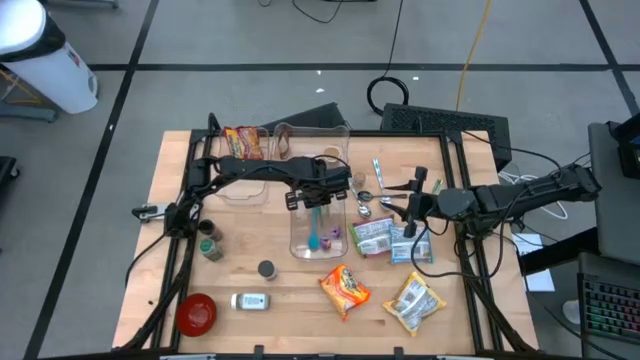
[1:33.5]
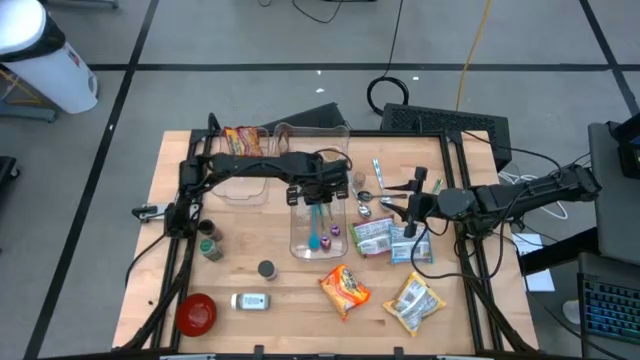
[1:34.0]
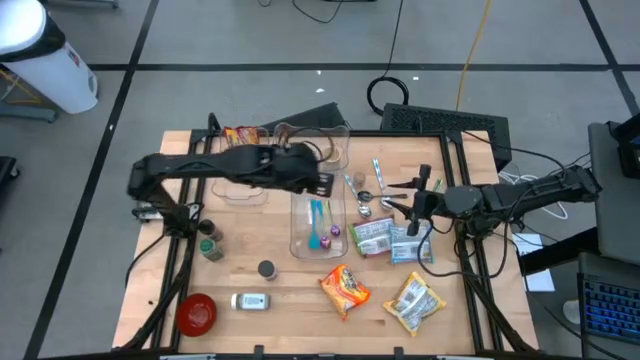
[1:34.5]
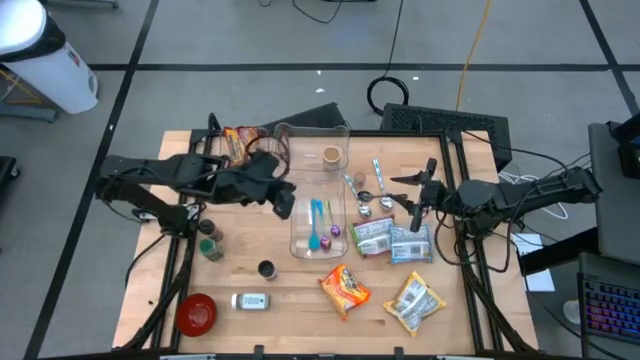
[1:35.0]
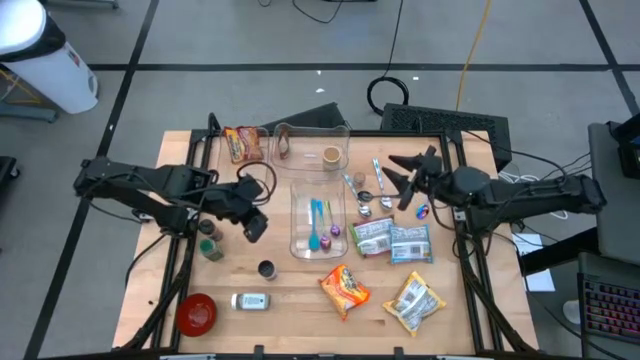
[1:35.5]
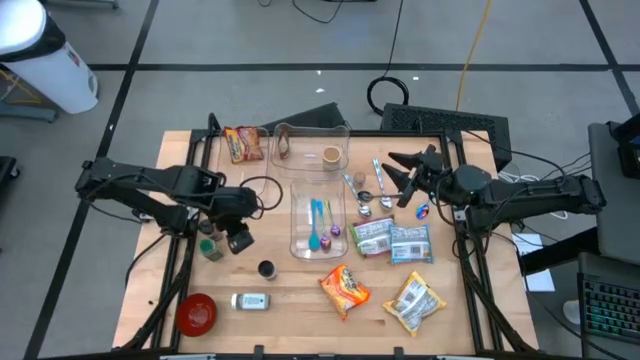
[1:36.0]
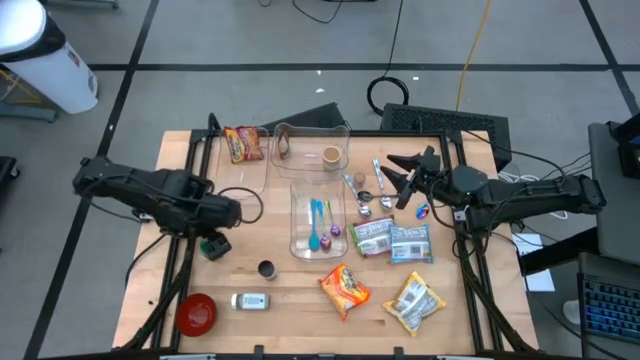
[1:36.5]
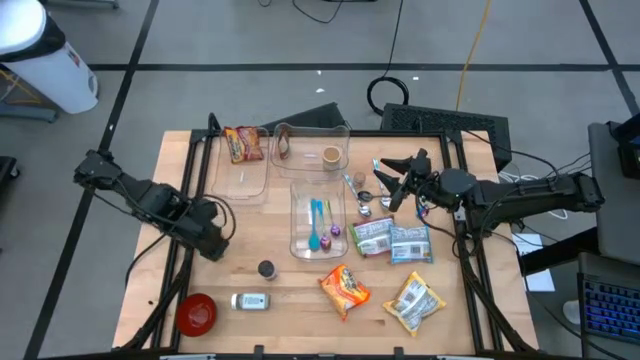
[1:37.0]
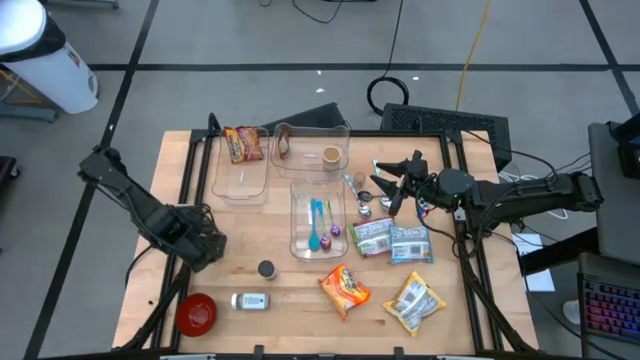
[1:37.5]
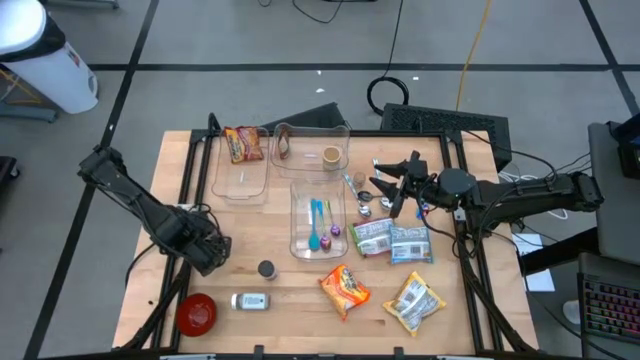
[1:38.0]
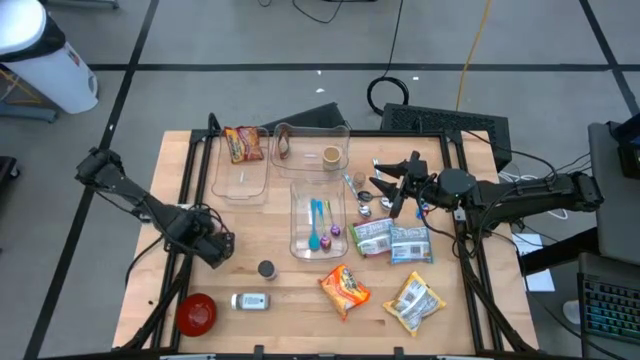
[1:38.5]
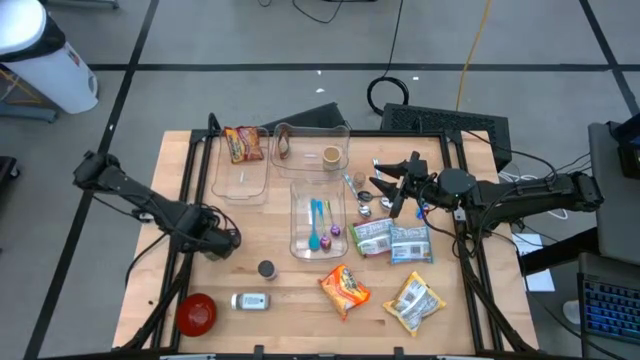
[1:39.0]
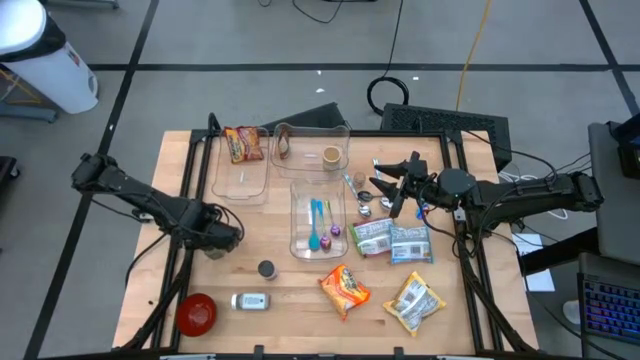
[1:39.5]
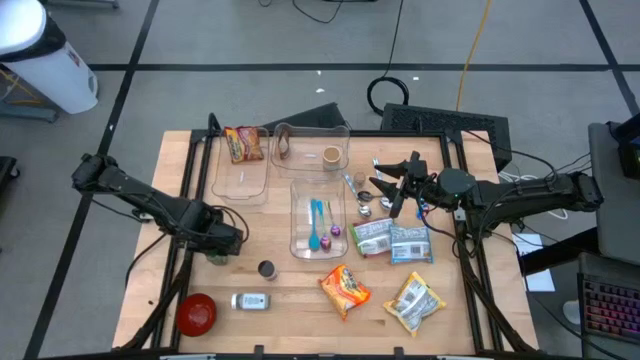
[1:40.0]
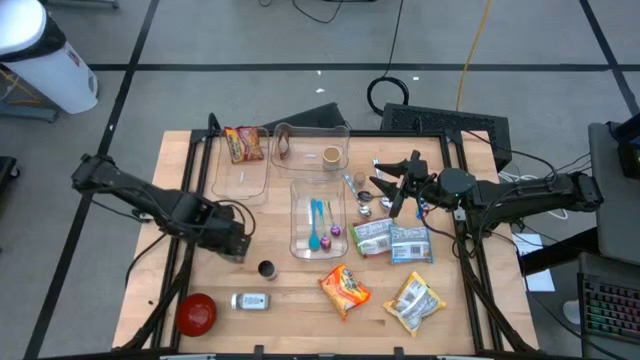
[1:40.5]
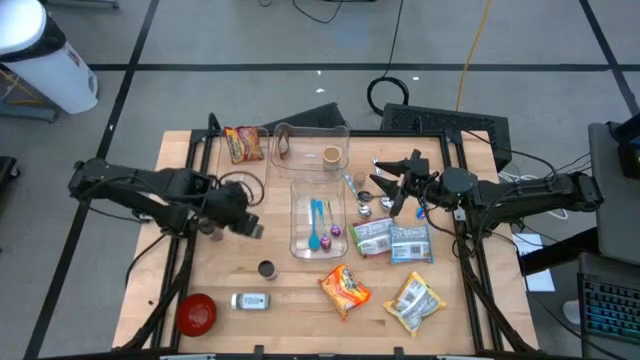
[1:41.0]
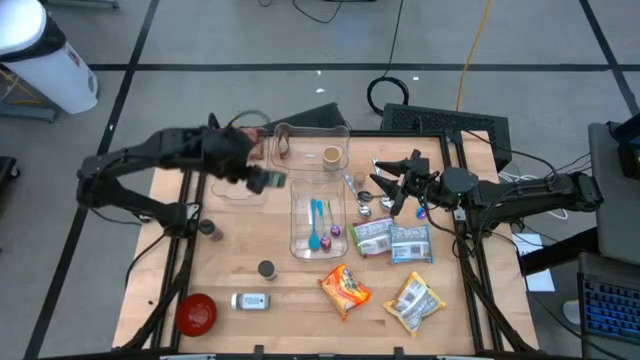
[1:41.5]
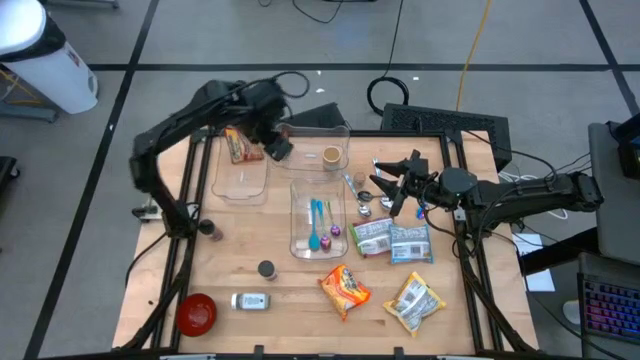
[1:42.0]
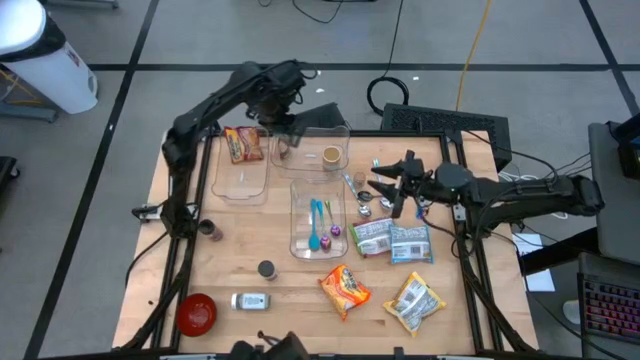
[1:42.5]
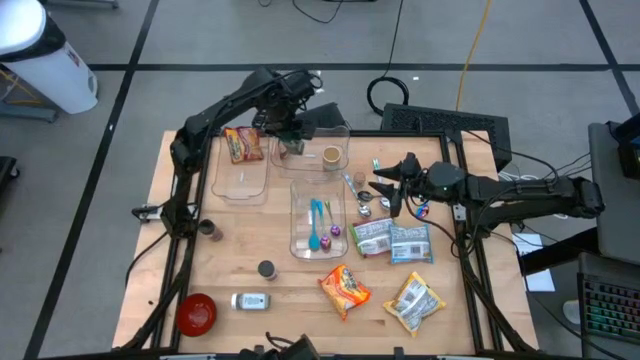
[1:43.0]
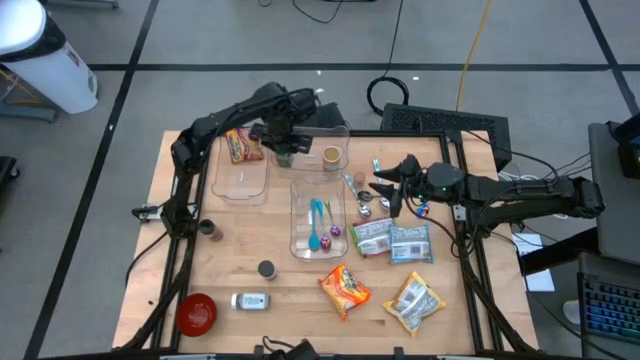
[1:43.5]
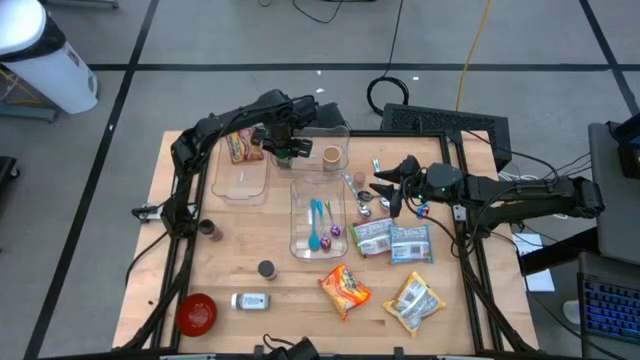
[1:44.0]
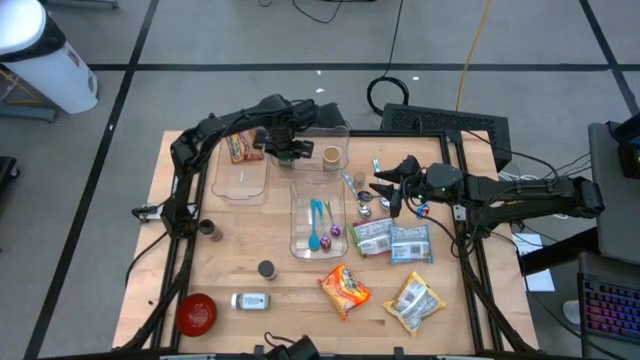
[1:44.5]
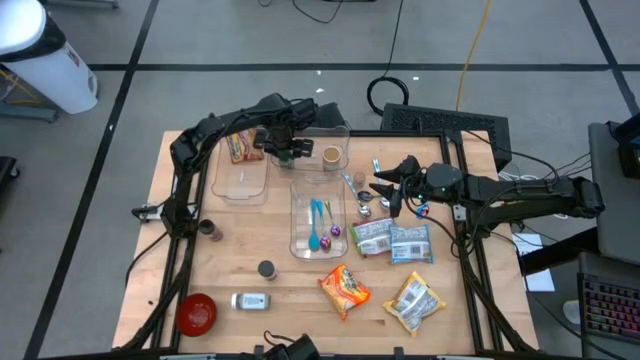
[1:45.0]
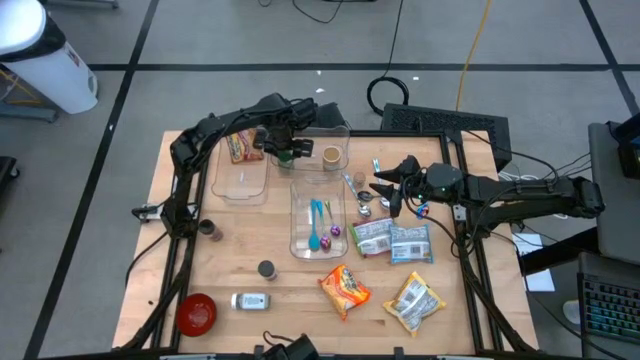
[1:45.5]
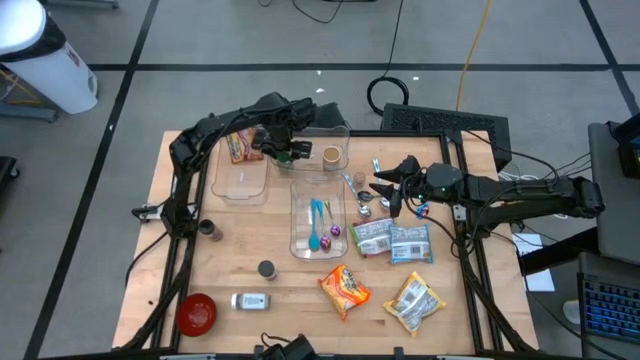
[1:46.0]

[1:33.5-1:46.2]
Task: Pick & Place Food Item
Put the green seasoning bottle into the top right transparent bin
